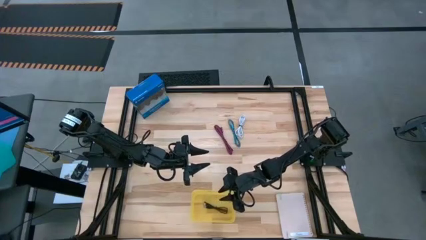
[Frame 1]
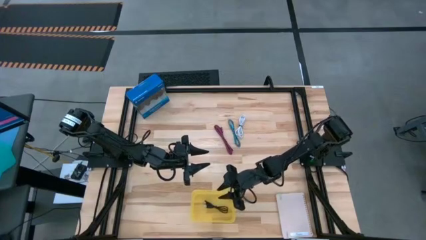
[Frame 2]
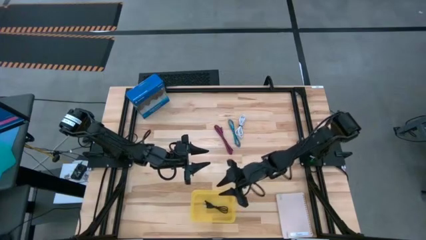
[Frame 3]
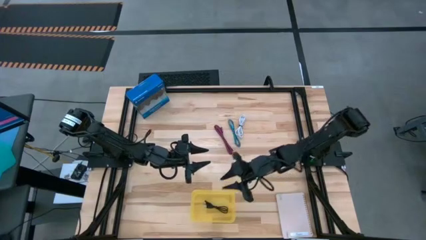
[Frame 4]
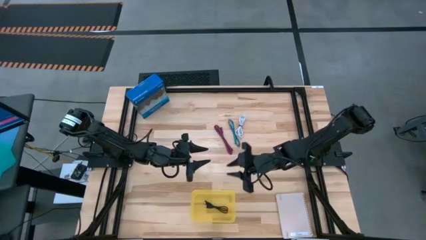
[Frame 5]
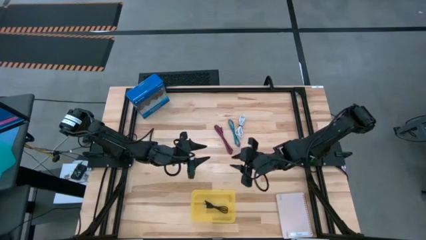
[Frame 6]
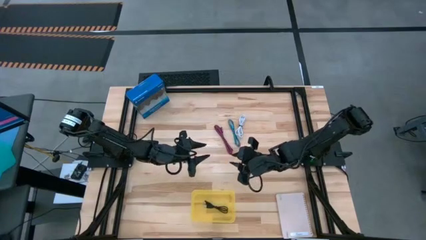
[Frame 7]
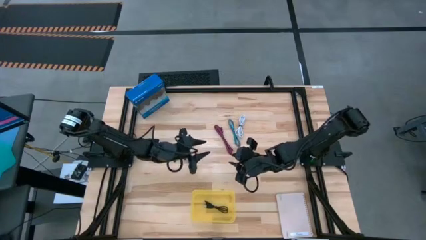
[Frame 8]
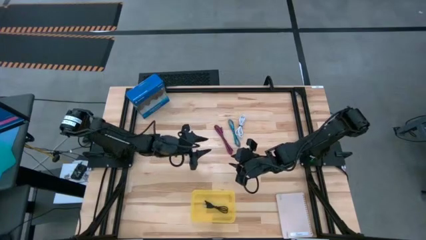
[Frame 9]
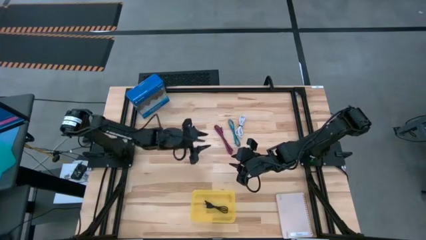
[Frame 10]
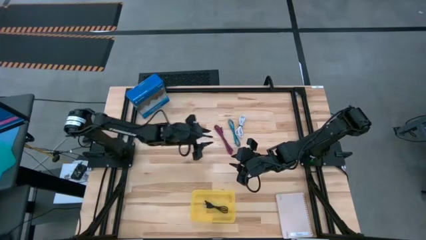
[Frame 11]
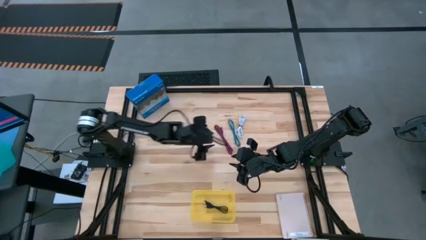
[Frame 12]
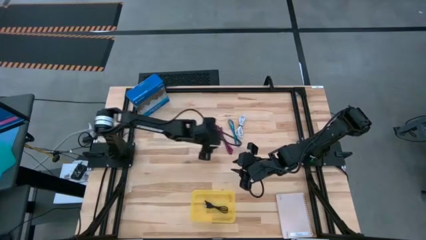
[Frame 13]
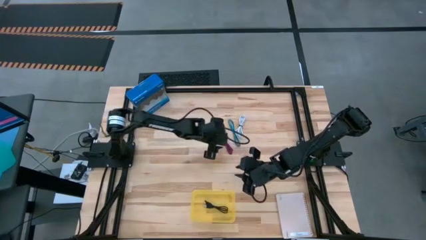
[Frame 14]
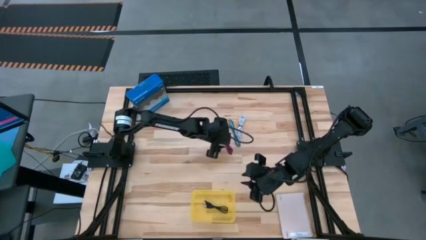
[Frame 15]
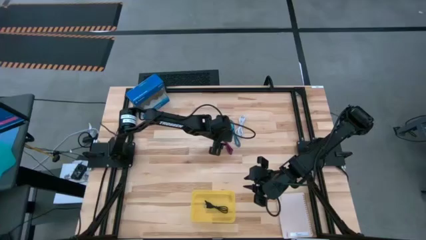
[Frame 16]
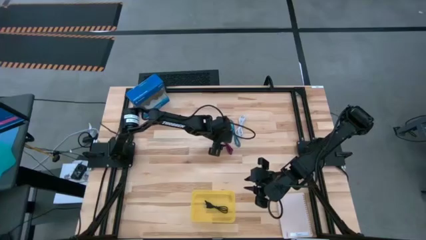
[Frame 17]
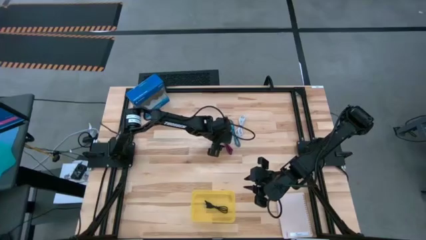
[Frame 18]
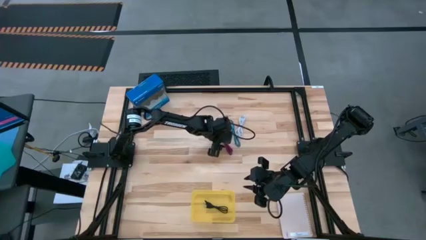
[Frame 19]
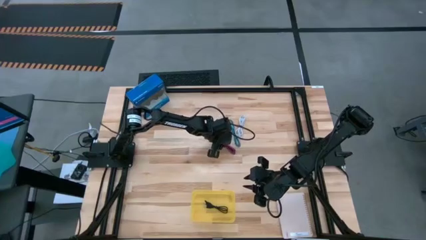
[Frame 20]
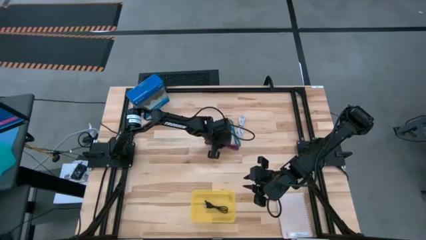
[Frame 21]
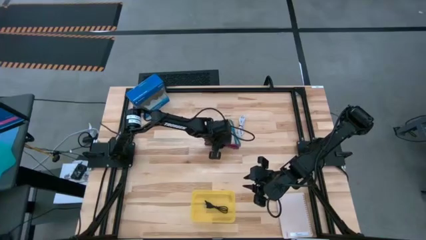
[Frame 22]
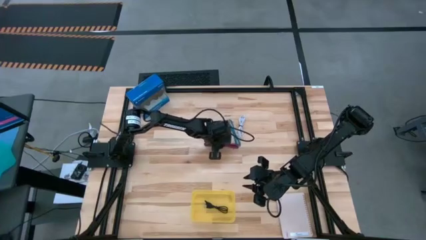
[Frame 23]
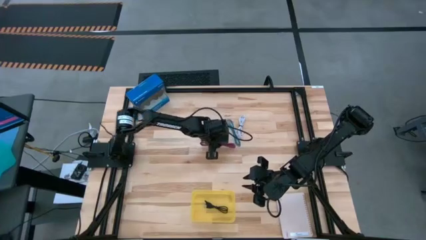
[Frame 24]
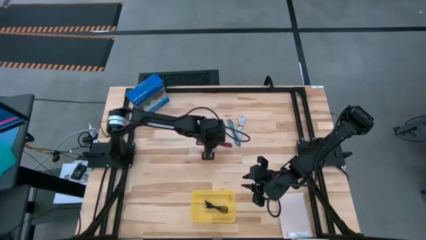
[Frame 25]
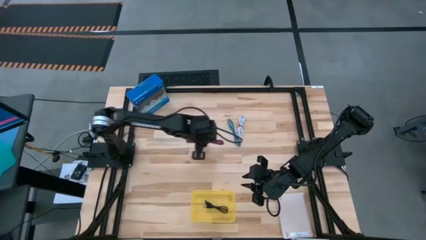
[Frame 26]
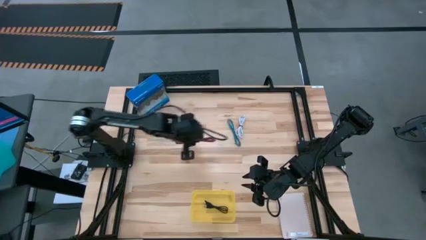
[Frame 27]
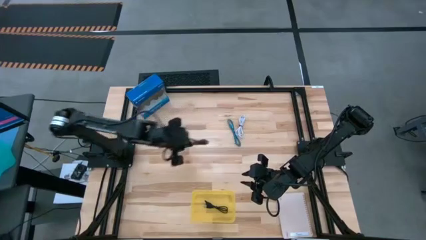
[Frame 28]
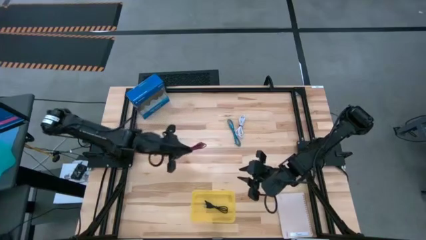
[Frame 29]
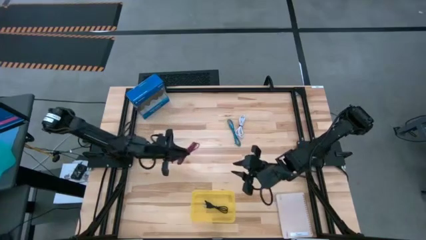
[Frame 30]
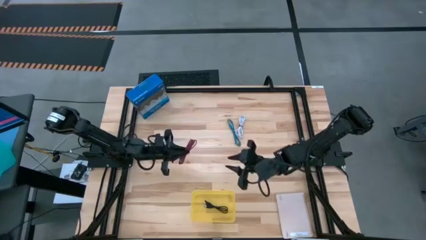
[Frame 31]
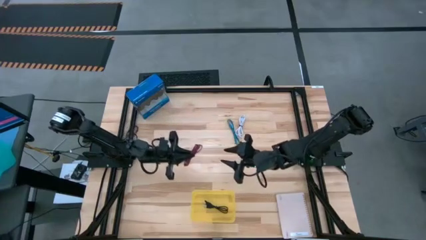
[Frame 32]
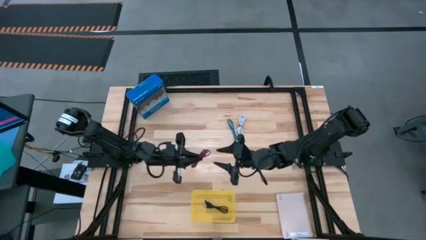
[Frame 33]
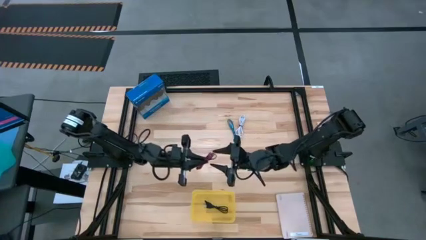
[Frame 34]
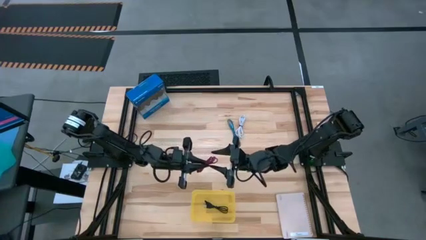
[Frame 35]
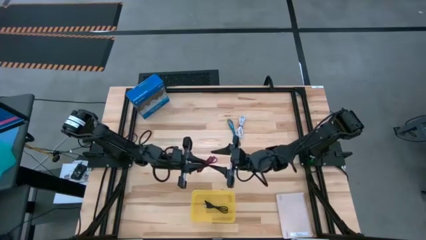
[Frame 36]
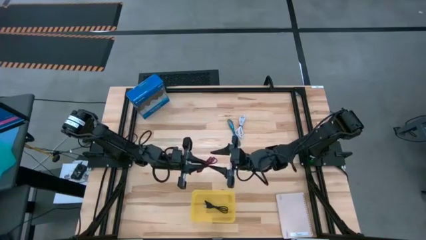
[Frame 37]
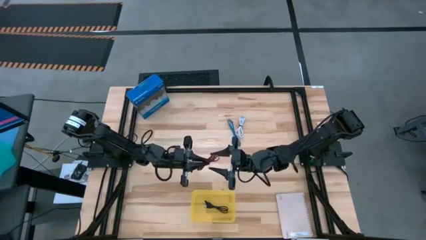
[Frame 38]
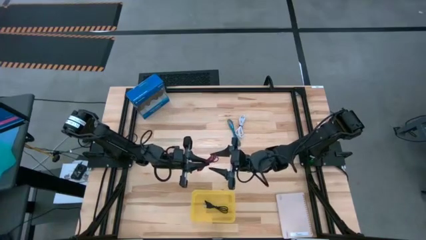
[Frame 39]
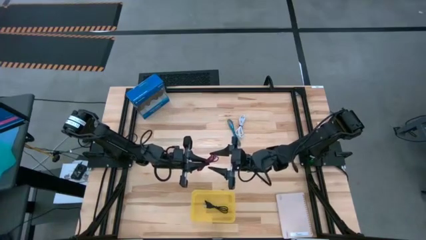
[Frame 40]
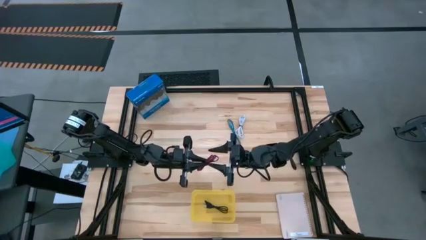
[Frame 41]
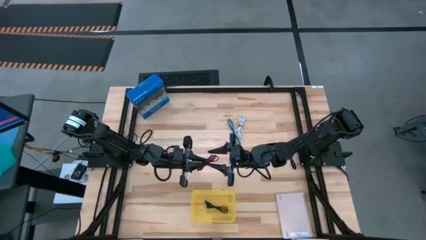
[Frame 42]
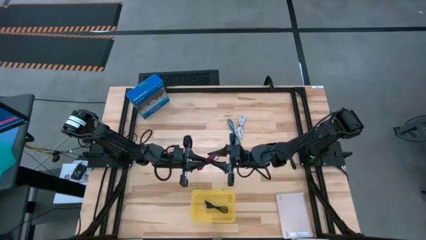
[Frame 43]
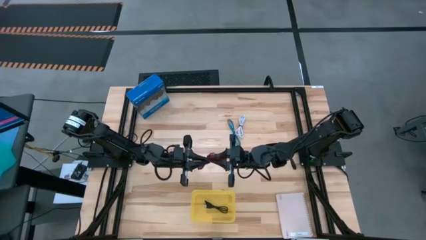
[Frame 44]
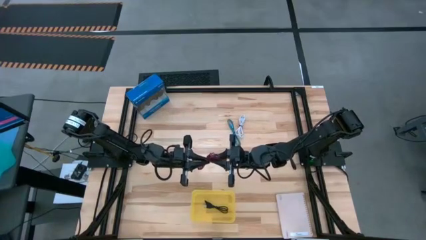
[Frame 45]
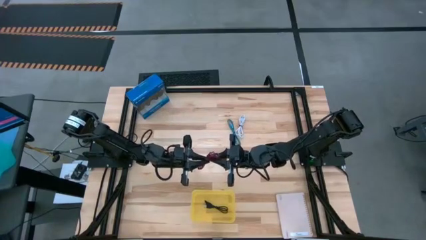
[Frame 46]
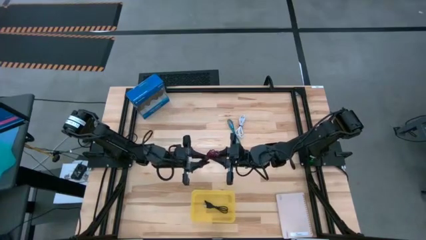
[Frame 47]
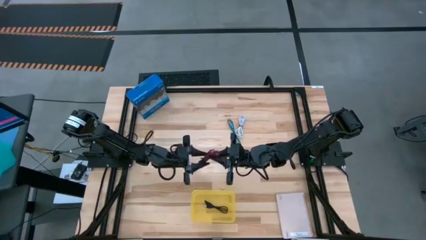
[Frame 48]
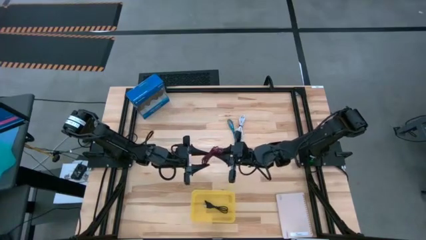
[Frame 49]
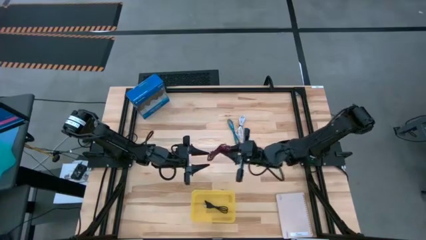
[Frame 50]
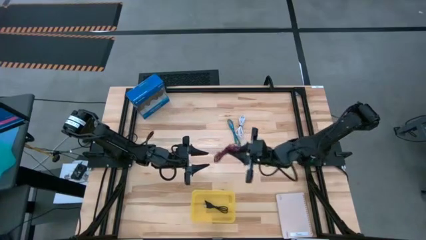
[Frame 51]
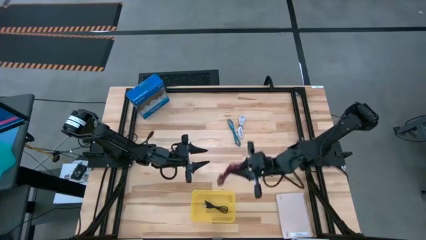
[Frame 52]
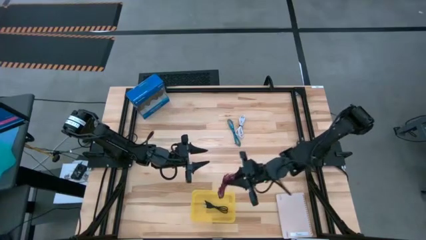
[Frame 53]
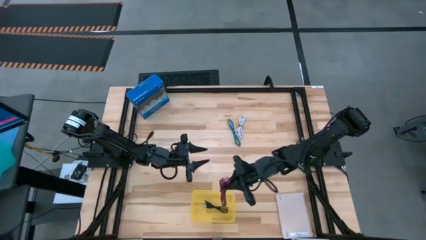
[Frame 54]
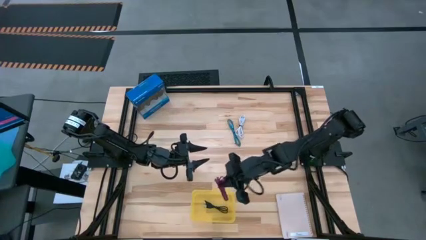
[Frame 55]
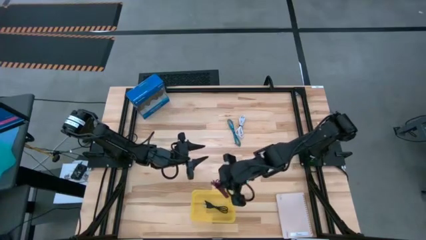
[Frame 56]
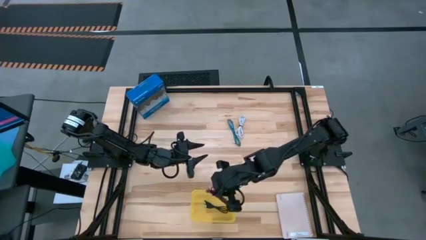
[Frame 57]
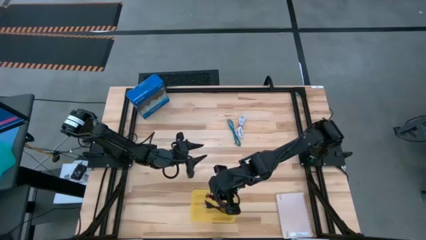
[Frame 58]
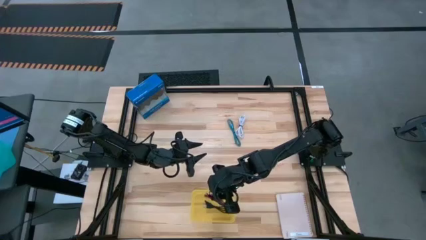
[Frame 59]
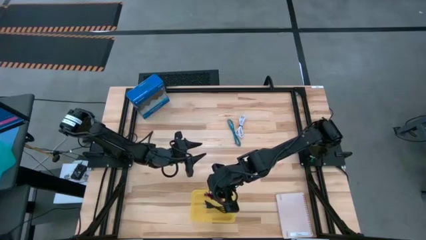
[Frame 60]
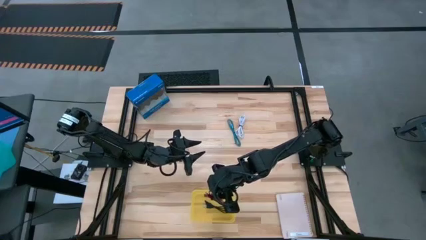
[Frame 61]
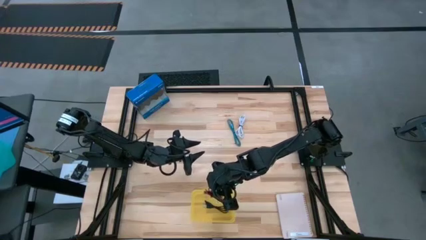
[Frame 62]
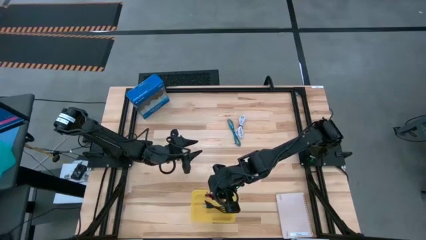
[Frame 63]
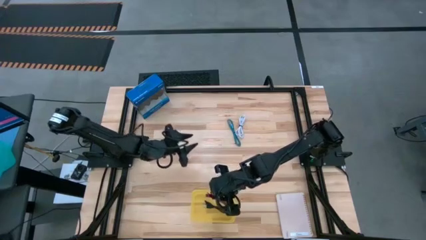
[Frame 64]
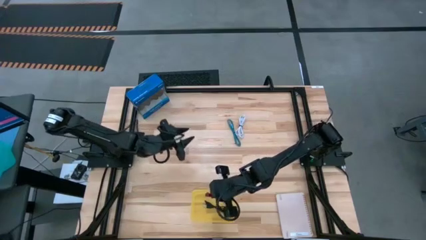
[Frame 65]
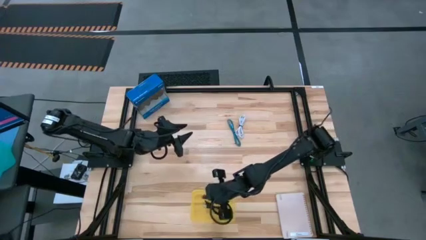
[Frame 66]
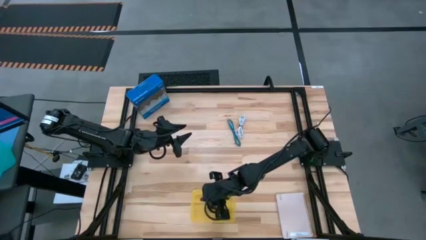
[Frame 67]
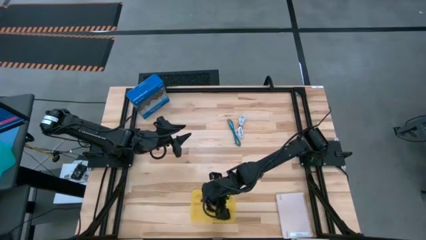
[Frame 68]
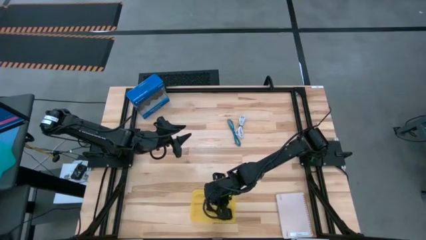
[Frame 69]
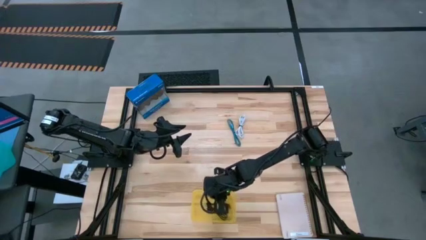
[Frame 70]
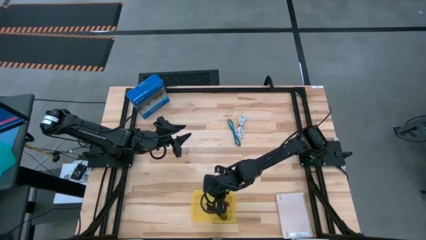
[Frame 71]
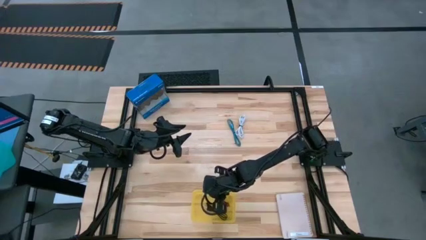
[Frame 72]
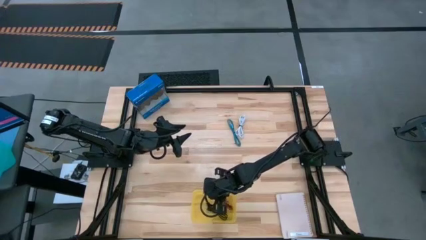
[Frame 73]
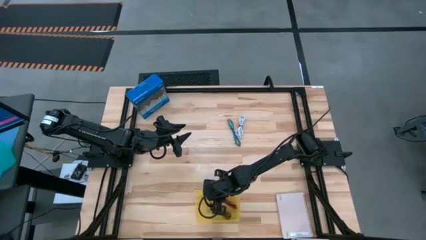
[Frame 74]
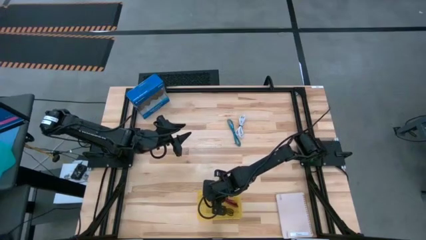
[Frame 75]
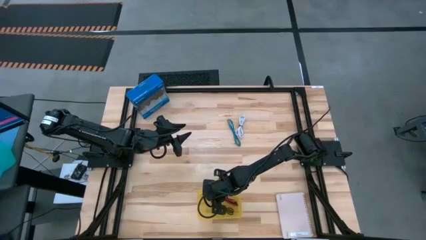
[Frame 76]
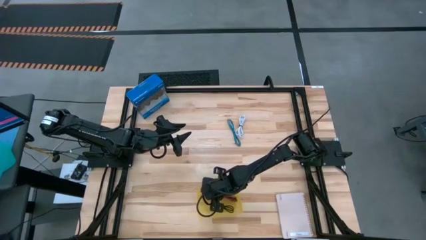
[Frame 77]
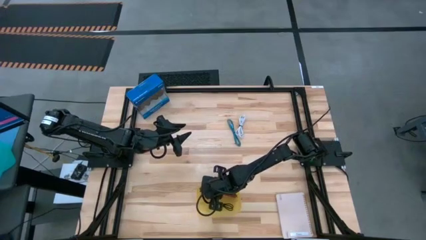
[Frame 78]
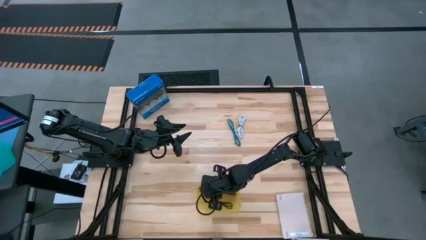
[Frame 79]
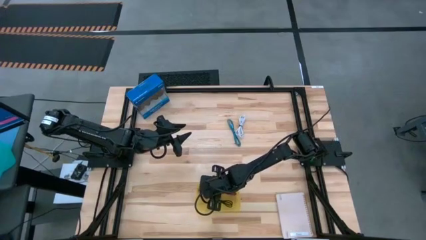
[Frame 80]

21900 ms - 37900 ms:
Task: Pick and place USB-C Cables
Put the pink charger cable into the yellow bin
